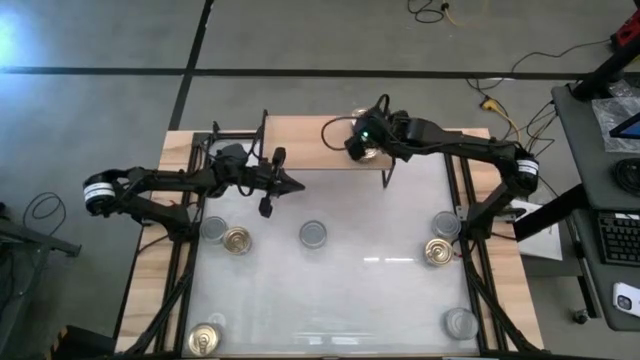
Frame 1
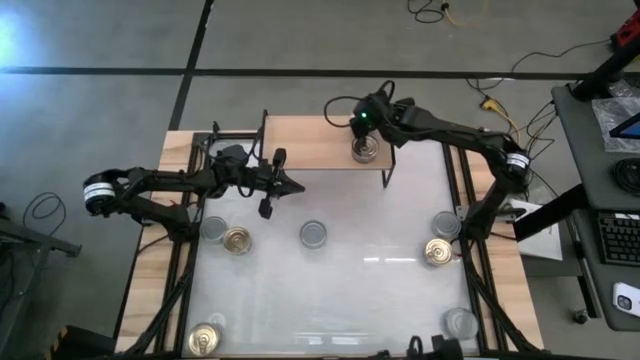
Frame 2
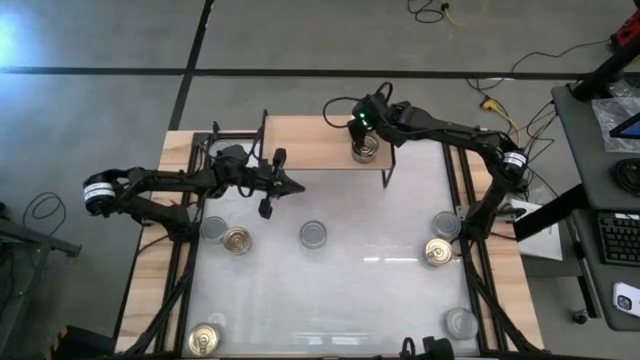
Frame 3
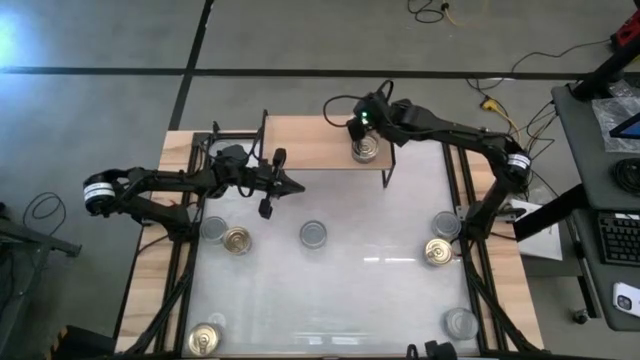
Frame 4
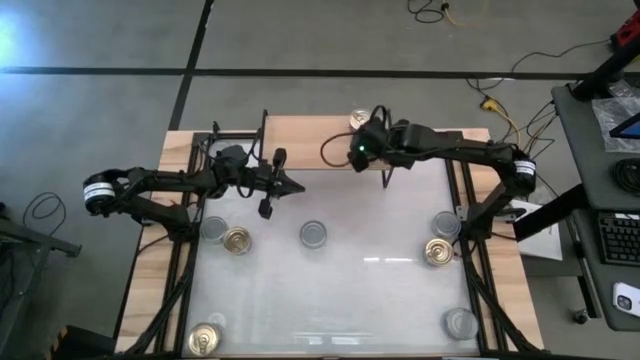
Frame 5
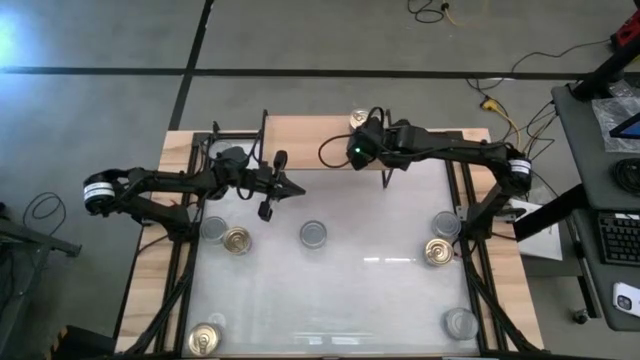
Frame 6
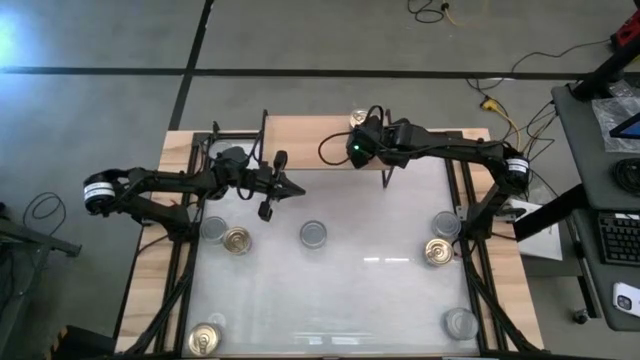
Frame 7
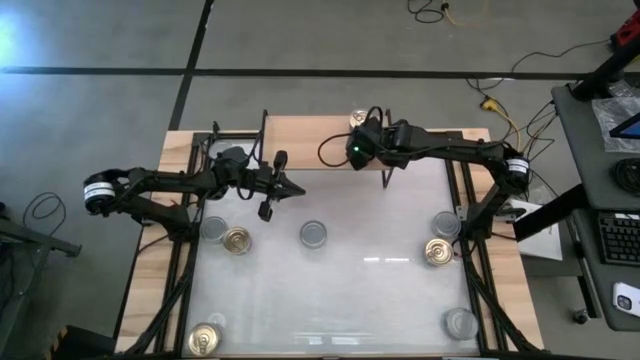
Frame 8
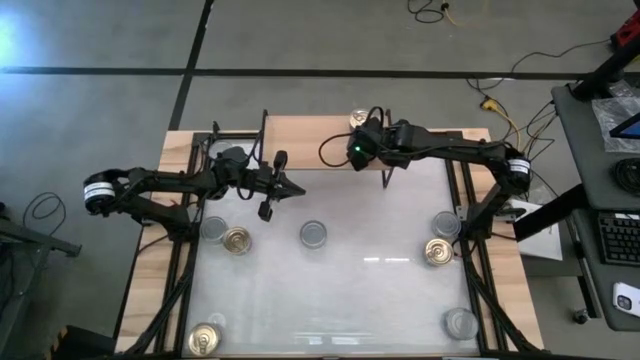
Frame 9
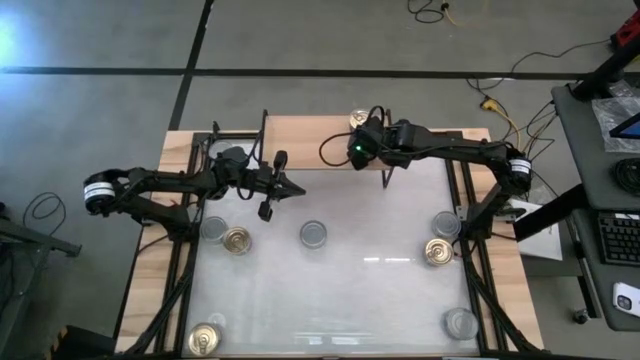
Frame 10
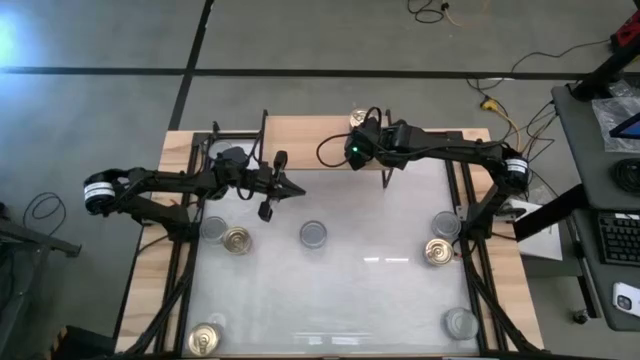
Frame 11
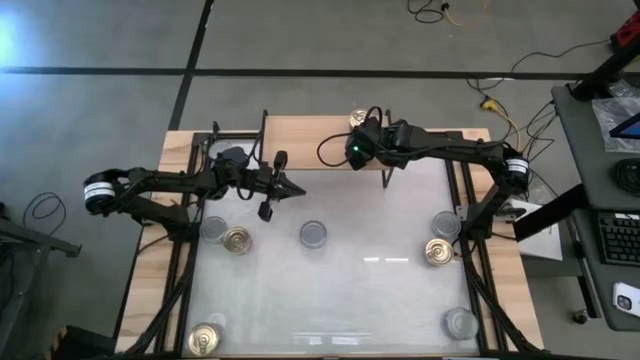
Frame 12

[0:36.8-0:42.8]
Task: Stack canned seafood by type on shelf
Adjust the blue tuna cans on the shelf

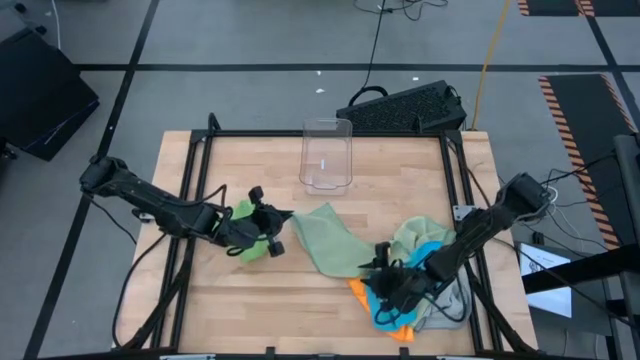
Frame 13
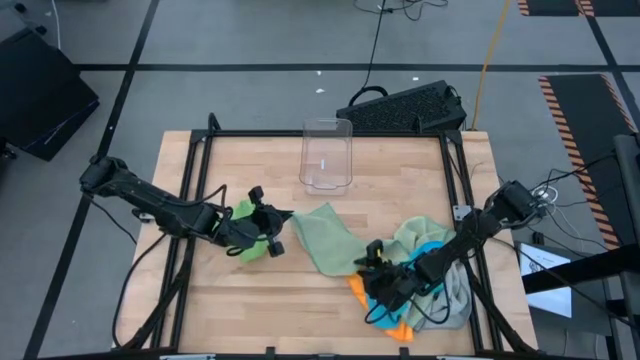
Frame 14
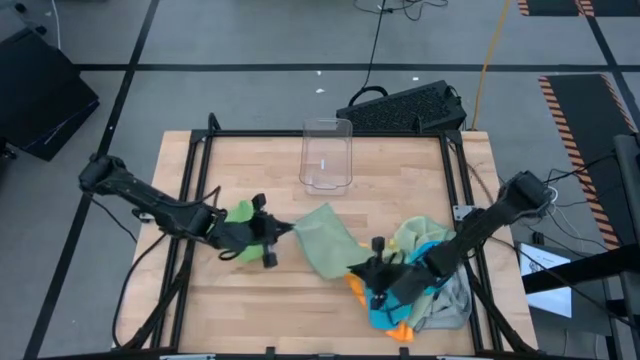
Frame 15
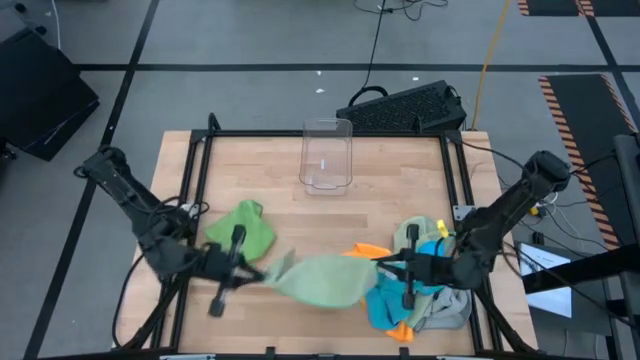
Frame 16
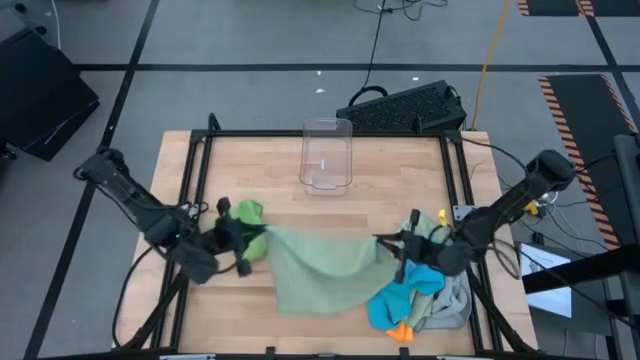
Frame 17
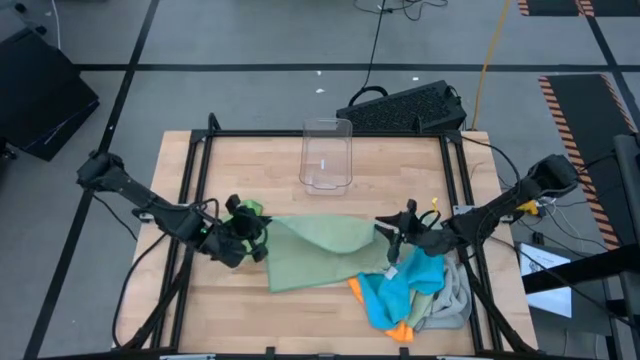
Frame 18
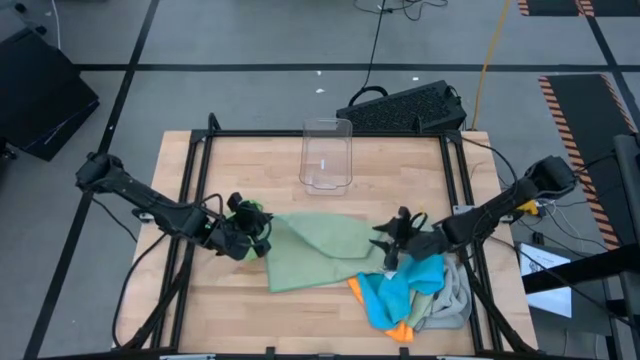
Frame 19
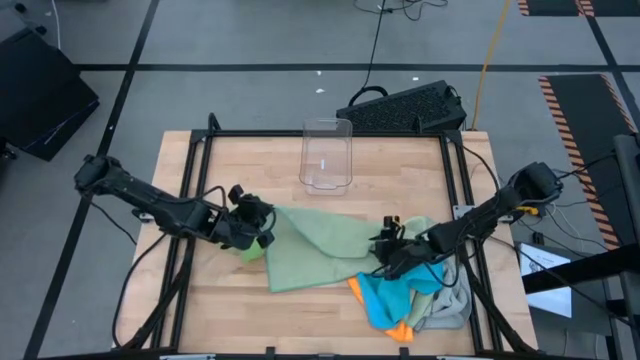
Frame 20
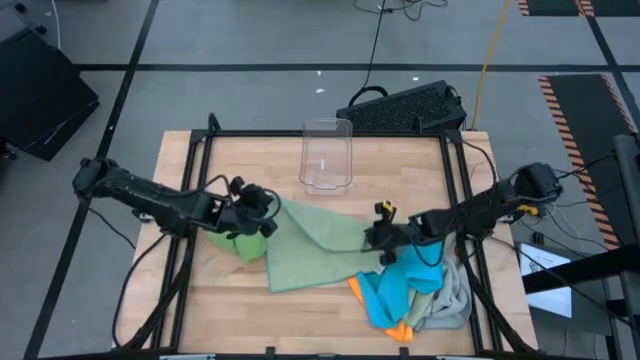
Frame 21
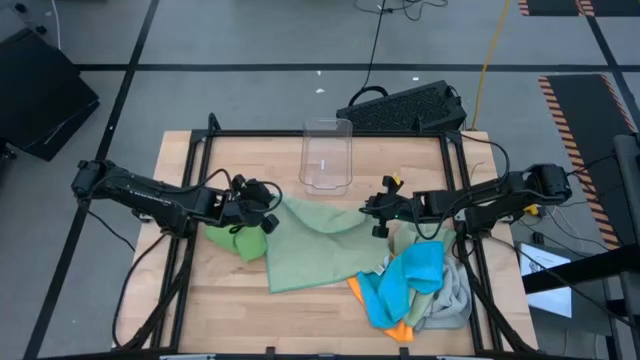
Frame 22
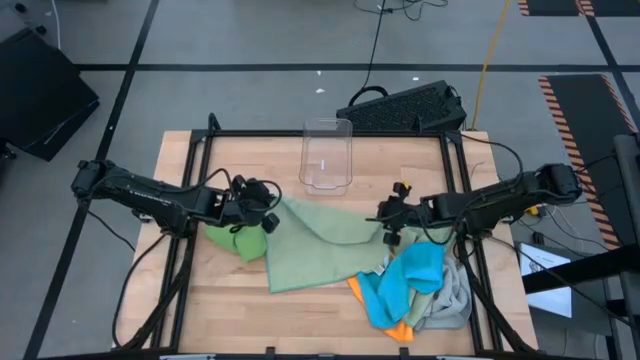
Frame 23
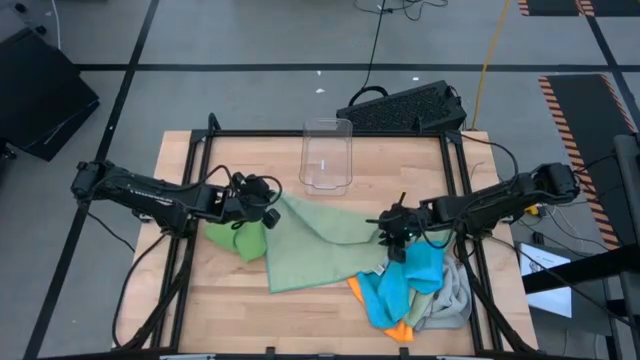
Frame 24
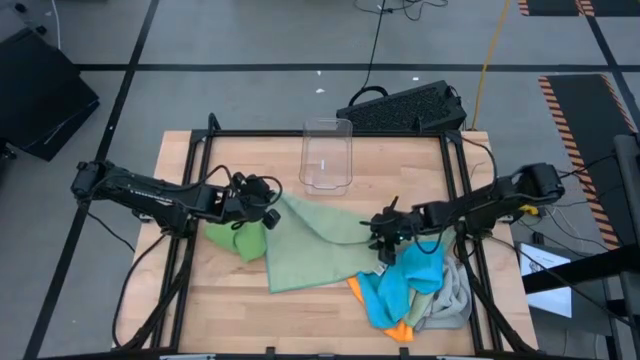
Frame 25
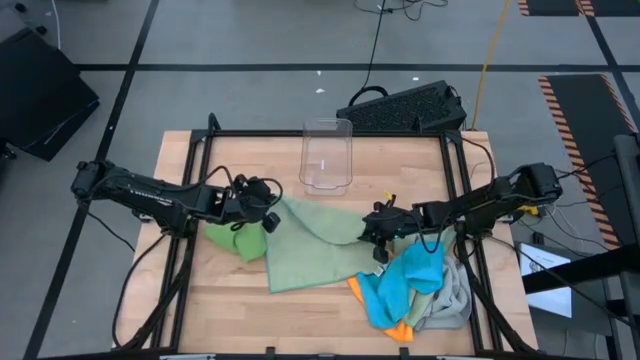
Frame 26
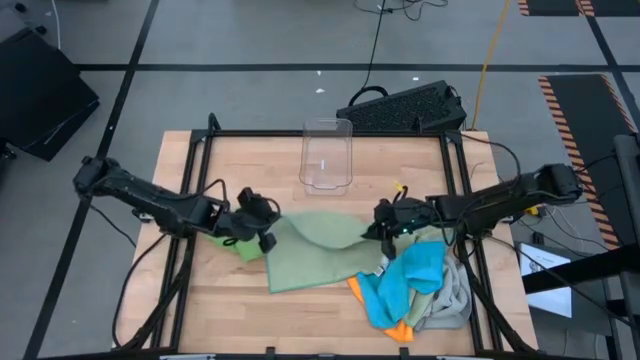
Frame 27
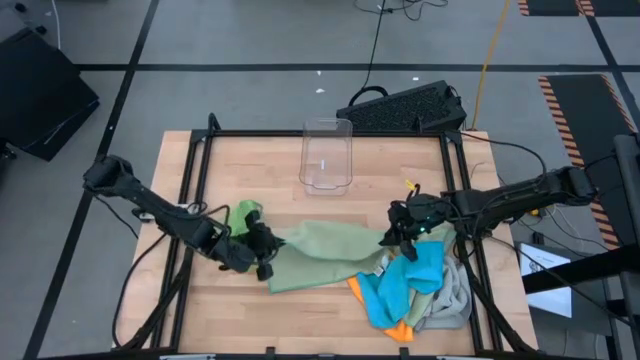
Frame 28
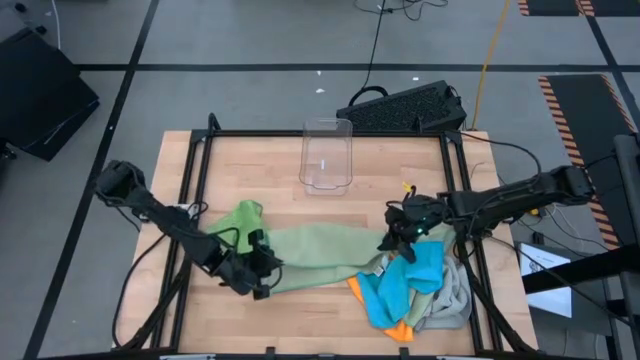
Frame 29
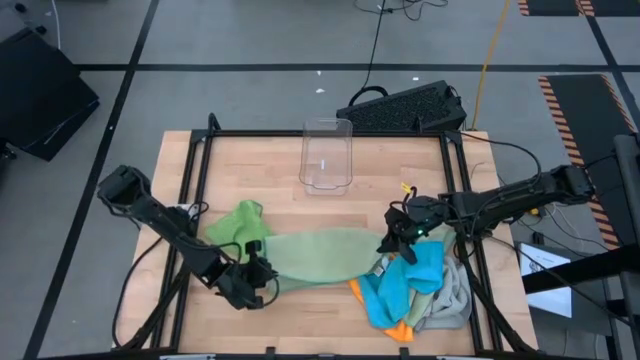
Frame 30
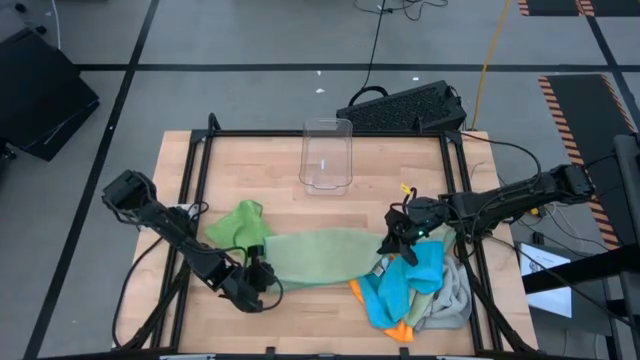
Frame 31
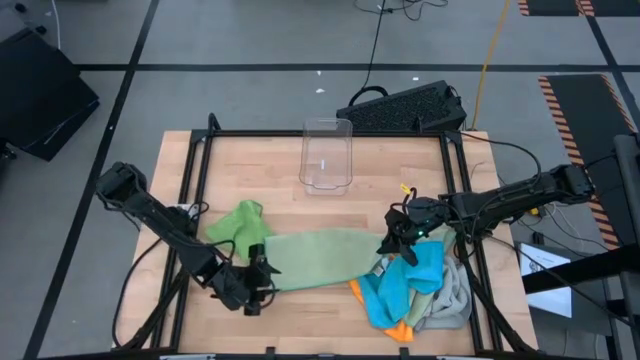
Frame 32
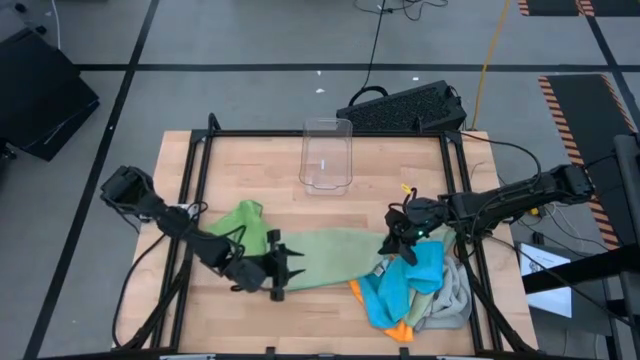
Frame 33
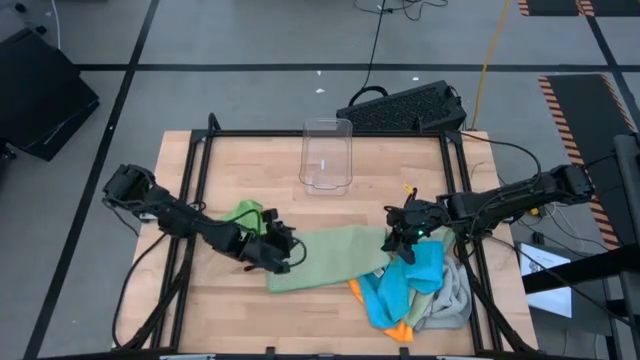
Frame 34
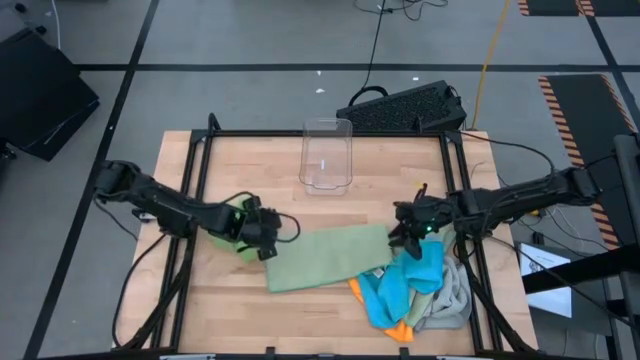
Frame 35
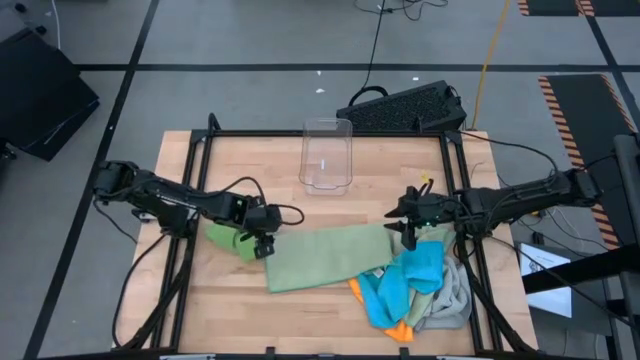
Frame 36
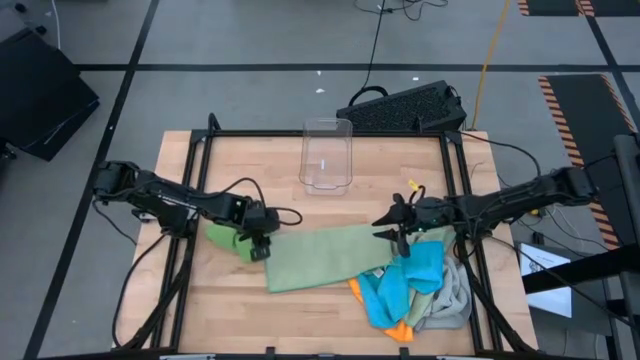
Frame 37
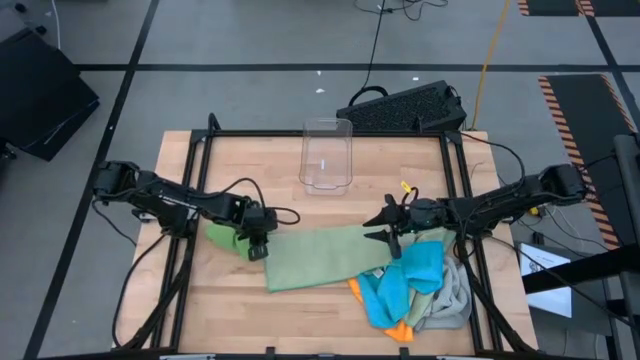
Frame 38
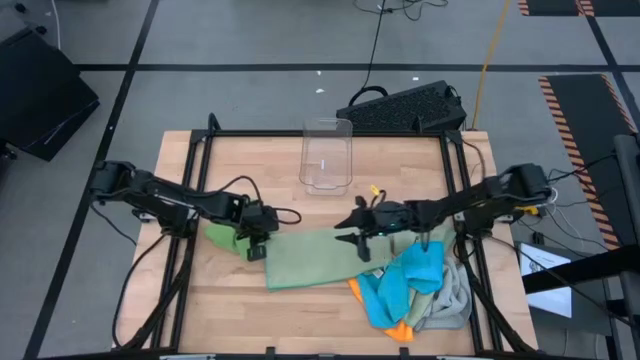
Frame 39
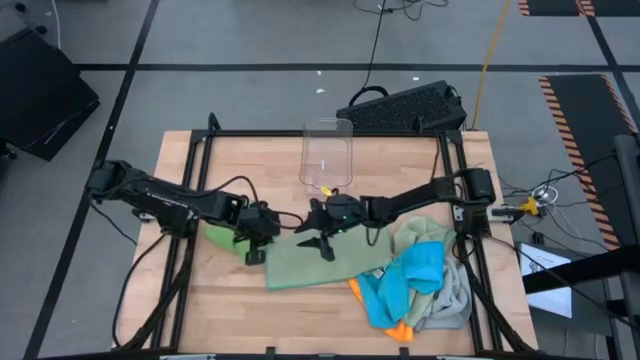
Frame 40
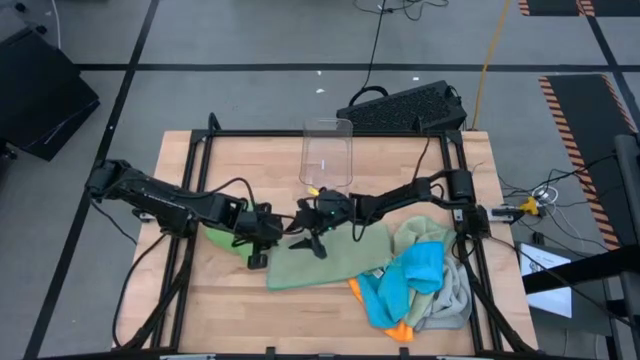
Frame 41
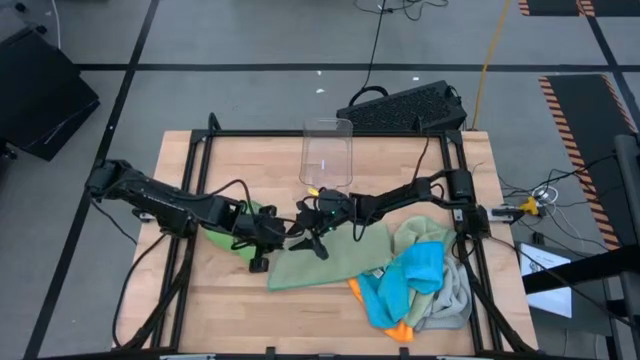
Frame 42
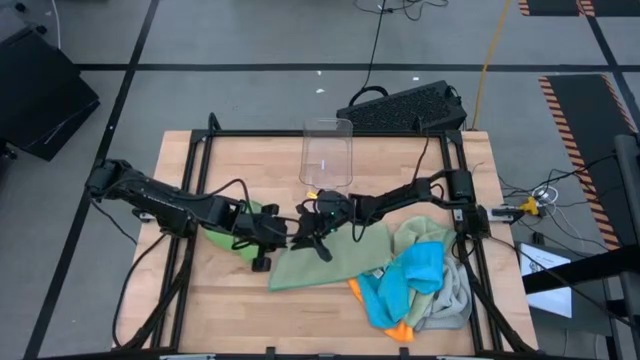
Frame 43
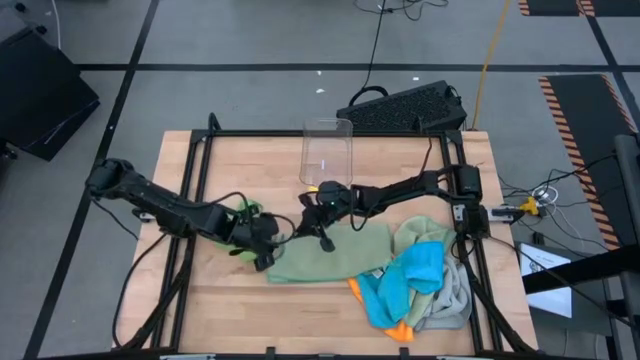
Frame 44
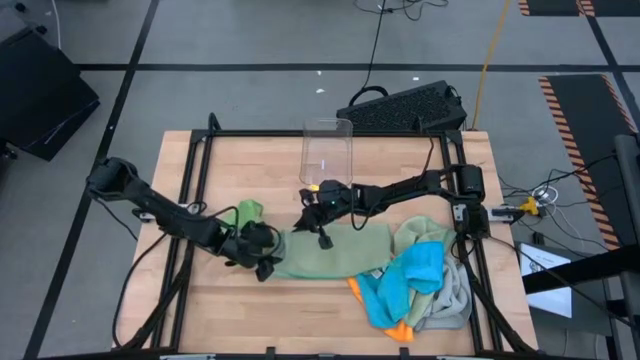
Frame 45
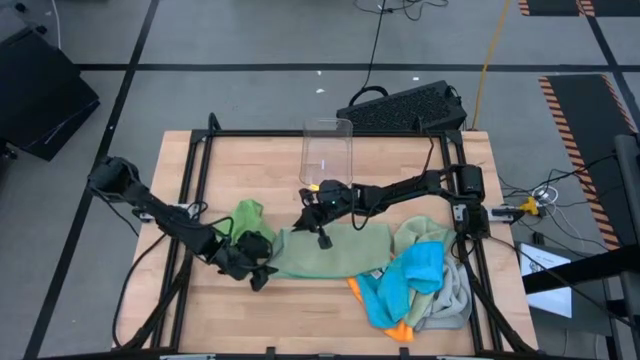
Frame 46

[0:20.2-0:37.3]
Task: Fold microfiber towels
Fold the left light green towel
